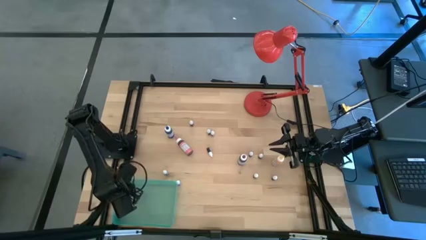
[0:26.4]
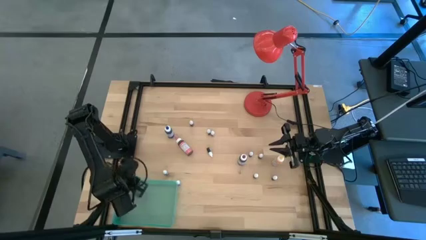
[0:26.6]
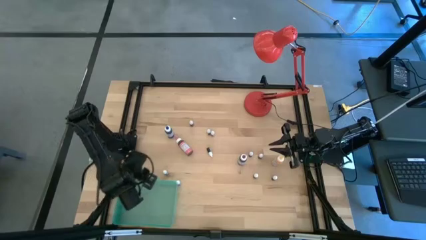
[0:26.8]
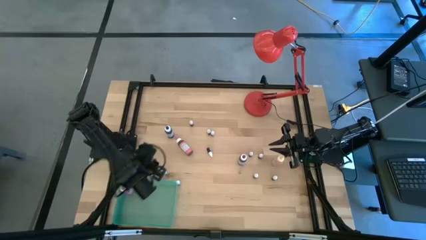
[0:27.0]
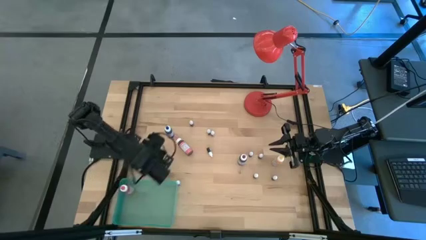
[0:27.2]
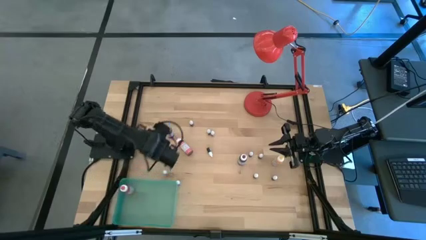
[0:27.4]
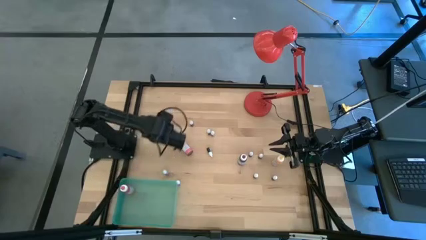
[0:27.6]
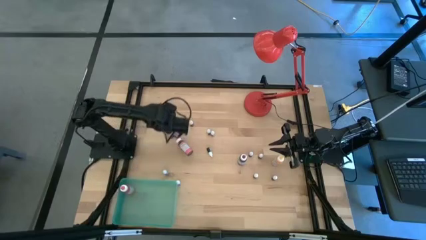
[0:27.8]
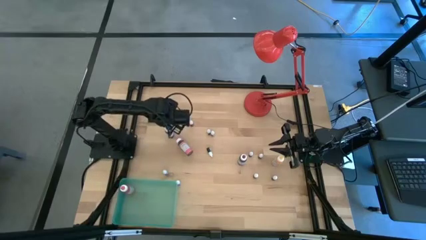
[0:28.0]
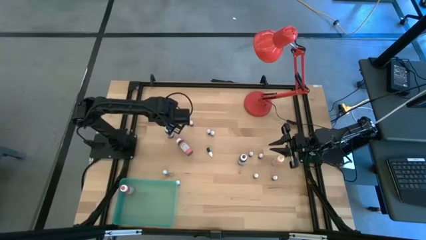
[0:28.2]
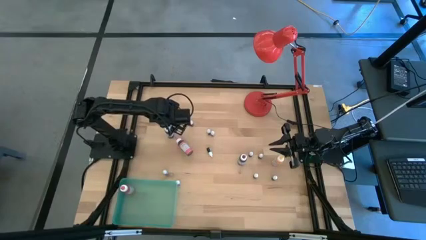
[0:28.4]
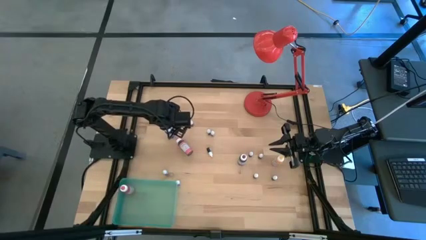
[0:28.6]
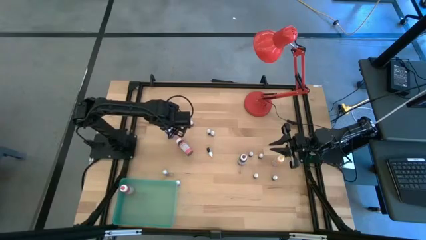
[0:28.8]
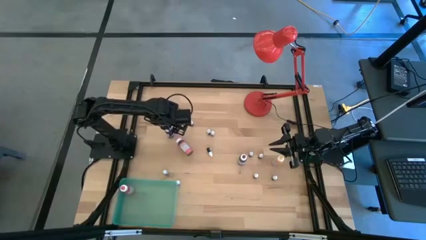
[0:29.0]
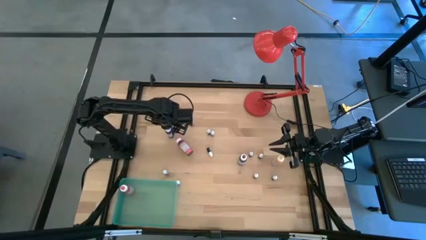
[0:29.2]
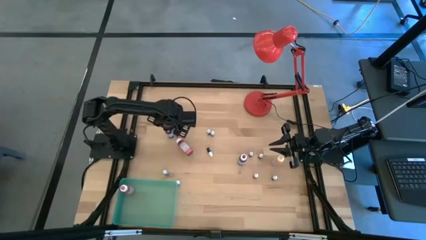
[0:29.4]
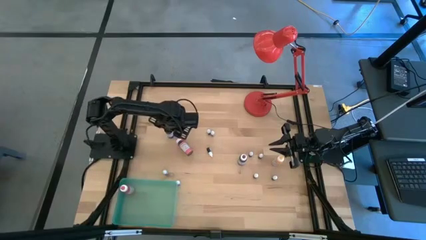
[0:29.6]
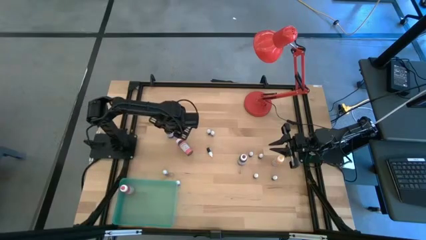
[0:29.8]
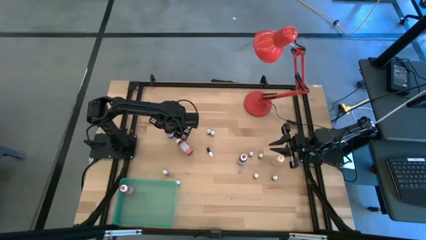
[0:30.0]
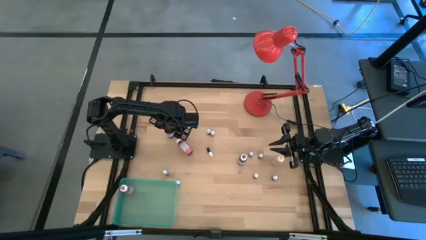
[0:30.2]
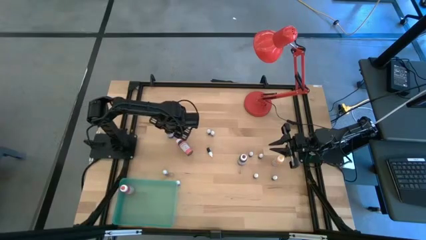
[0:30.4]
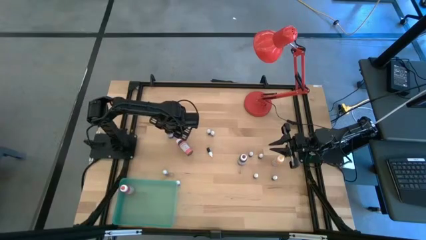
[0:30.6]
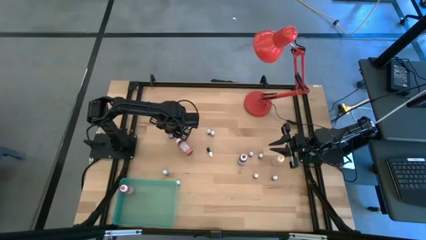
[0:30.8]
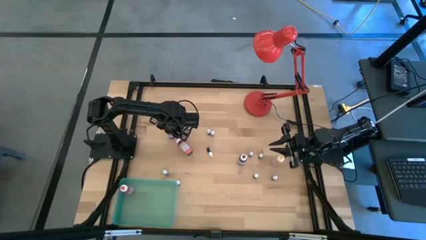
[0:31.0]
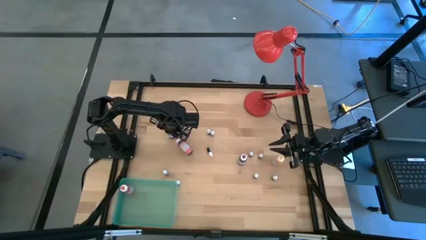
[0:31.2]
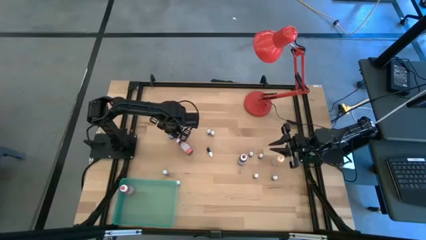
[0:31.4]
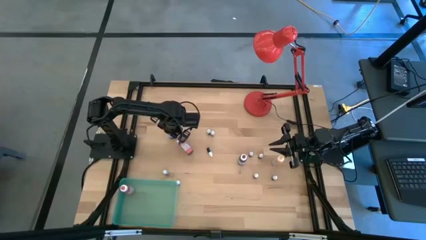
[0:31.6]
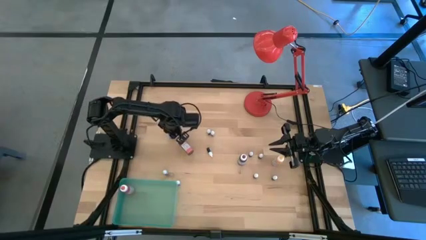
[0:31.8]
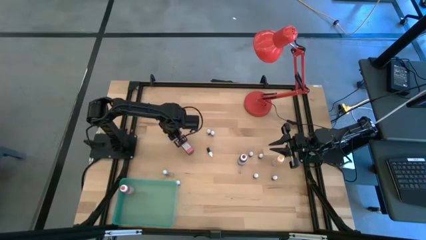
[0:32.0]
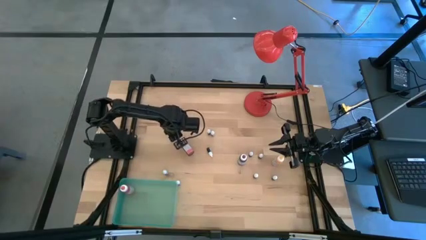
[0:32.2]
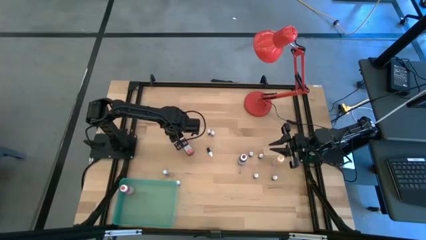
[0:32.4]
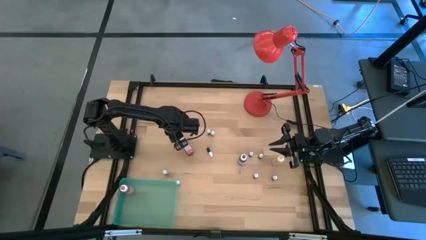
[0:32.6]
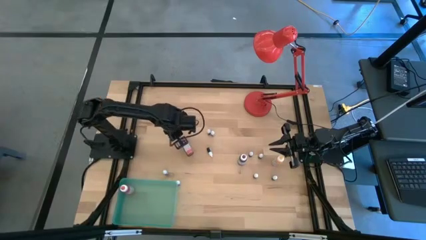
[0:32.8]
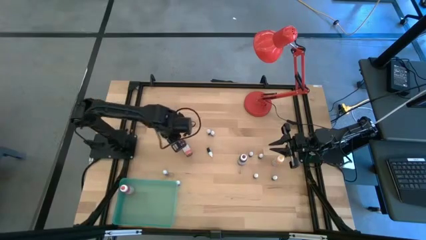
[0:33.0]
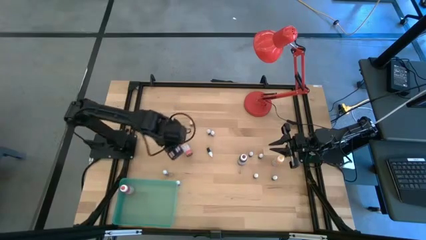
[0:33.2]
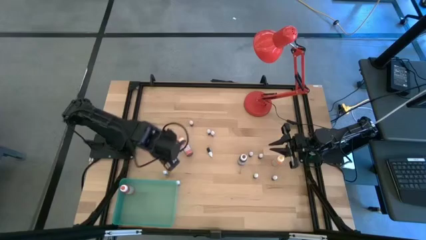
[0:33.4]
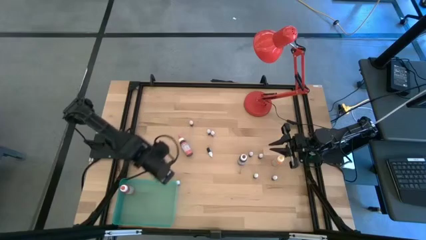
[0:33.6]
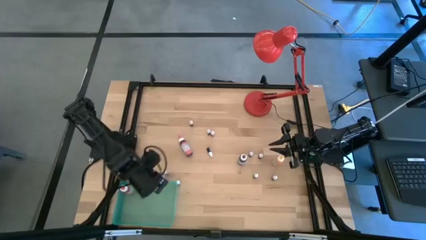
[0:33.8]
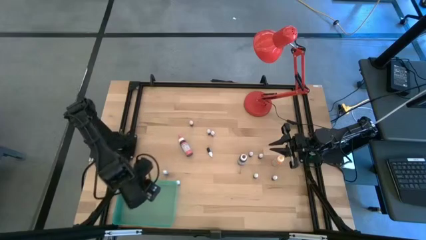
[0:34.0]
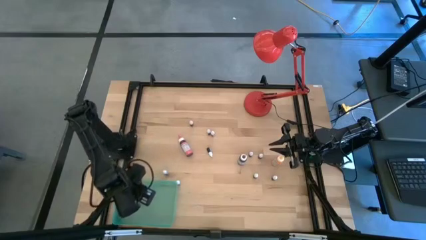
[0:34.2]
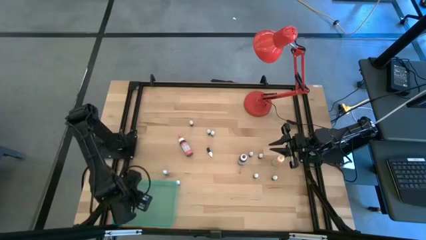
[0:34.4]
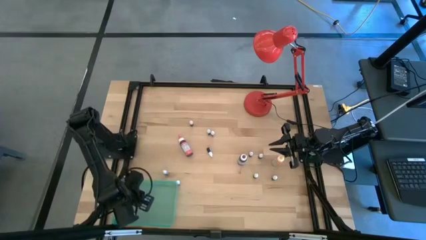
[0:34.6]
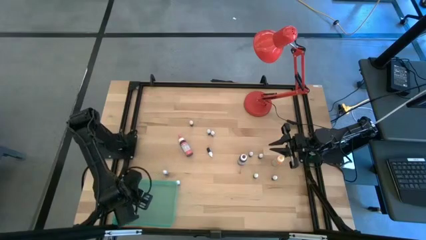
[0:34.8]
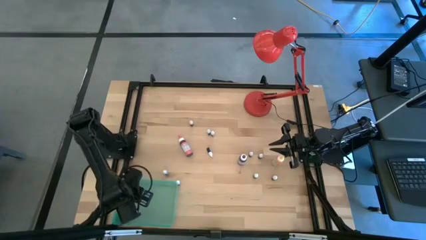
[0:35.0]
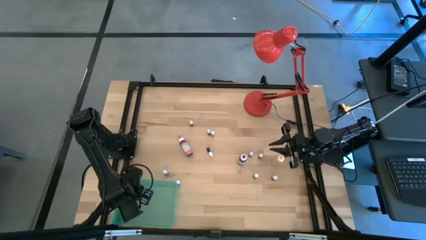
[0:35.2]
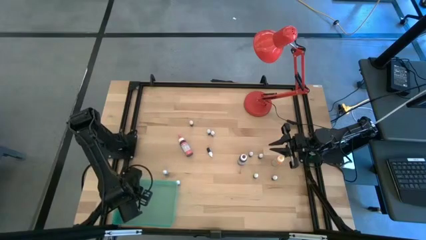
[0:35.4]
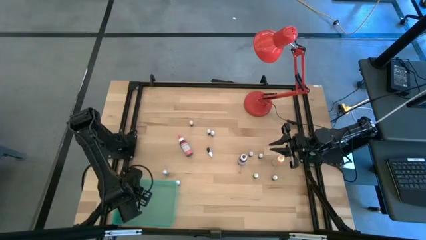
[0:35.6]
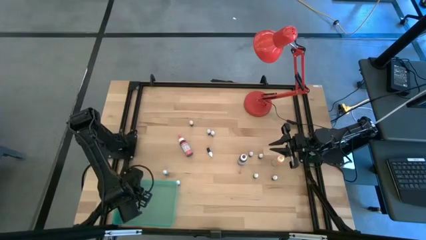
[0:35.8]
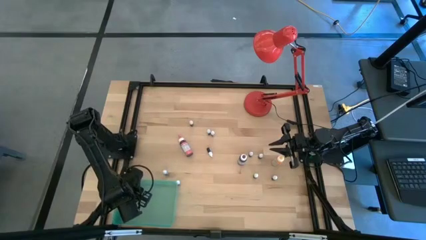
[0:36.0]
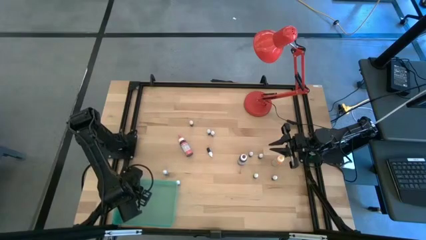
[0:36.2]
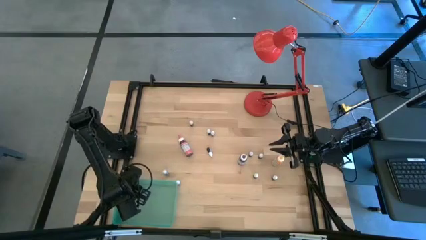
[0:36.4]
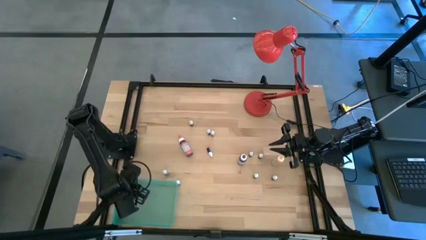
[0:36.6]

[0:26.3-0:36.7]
Task: Pick & Place food coloring
Put the blue food coloring into the blue bin

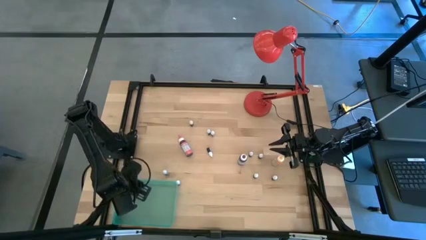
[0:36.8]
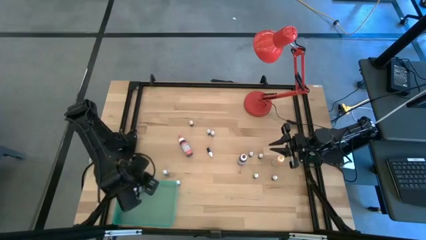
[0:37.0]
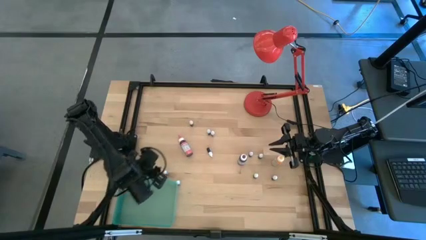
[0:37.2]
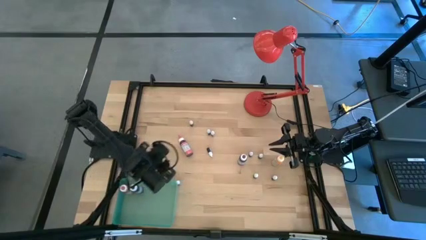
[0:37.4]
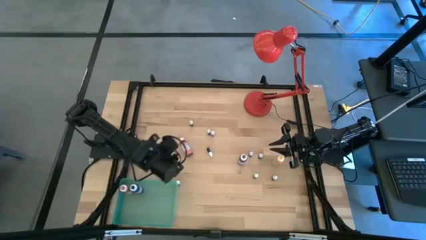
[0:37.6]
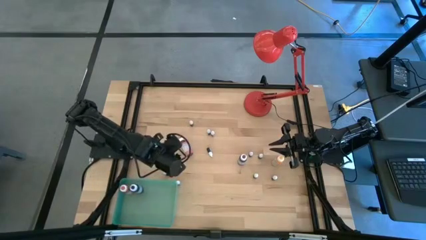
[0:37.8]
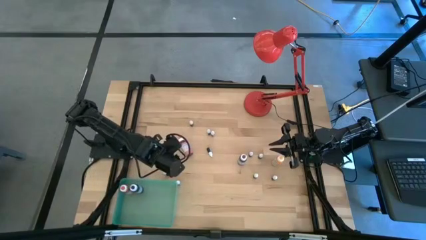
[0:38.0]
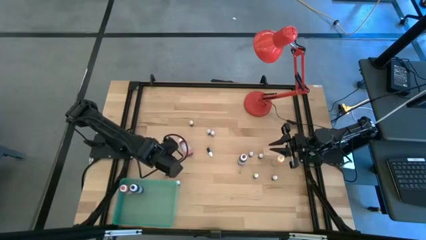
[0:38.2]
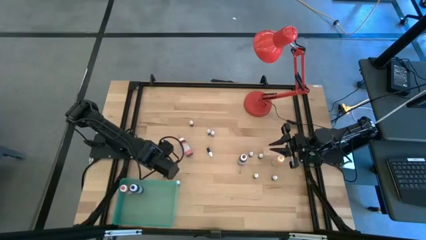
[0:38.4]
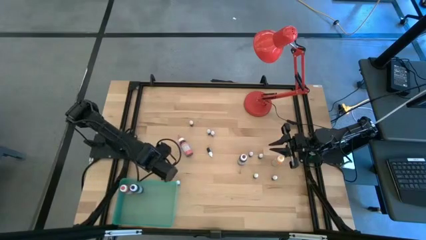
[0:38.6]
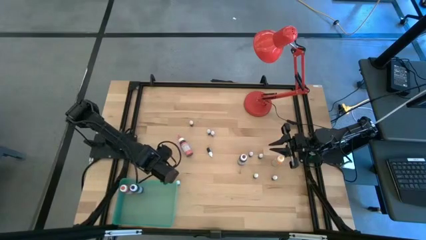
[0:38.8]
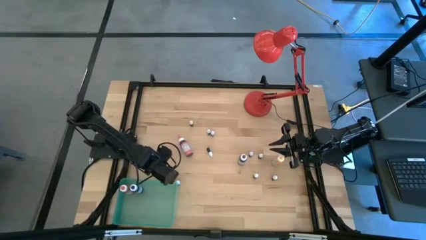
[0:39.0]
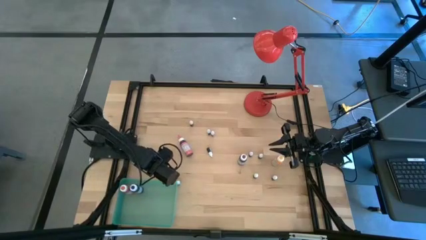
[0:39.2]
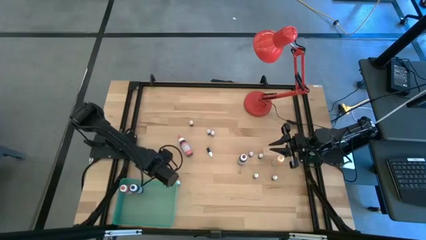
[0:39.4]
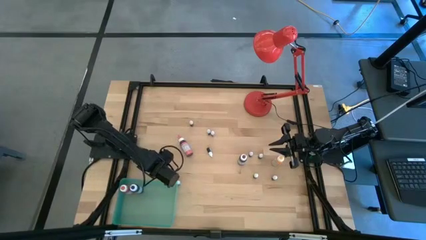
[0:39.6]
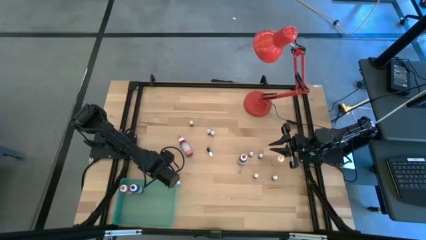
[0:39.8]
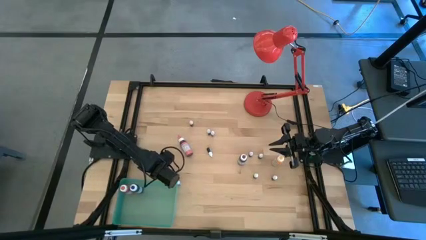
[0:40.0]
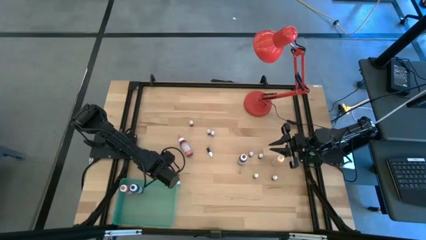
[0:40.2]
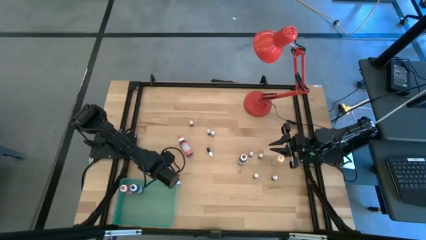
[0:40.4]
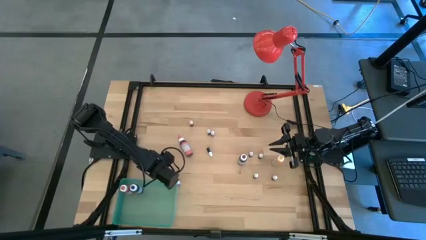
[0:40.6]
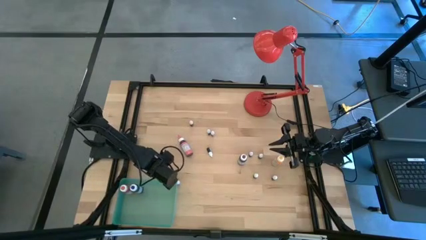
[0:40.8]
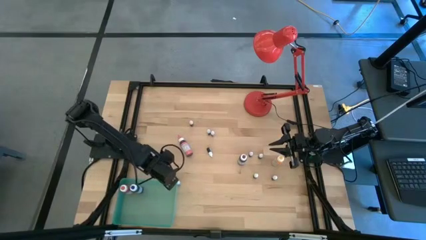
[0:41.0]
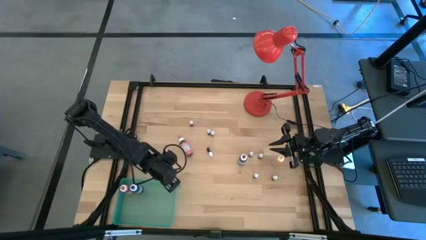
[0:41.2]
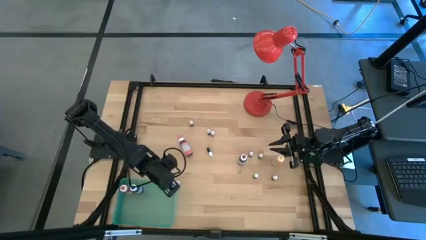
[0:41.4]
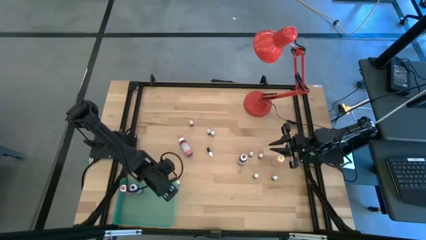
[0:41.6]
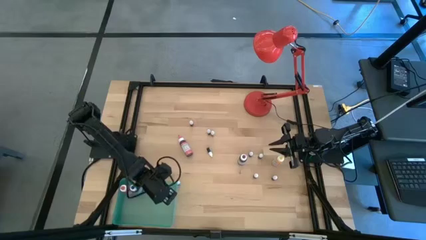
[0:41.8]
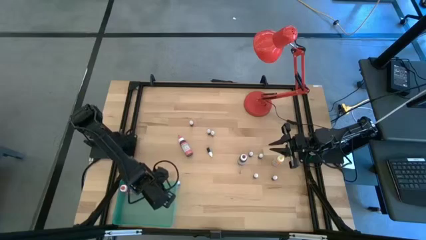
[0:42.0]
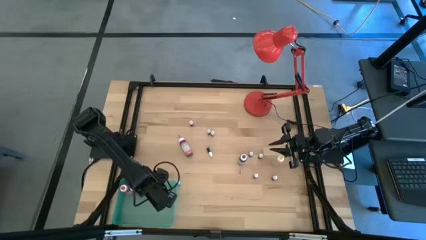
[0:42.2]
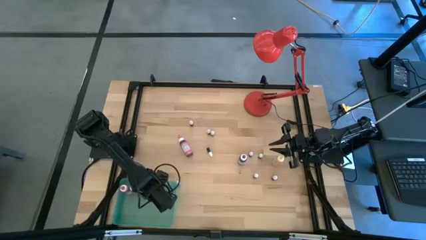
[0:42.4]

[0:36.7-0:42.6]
Put the black food coloring into the blue bin
